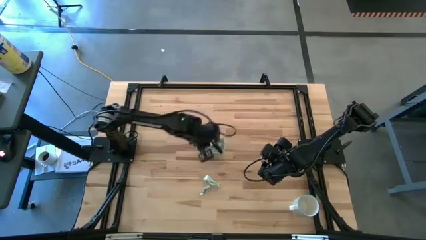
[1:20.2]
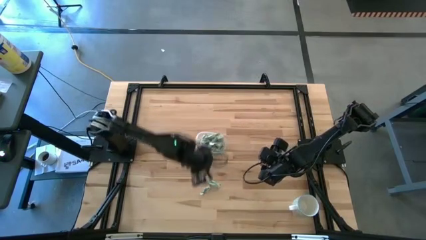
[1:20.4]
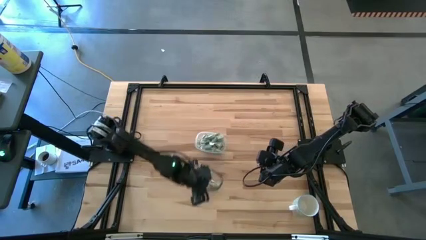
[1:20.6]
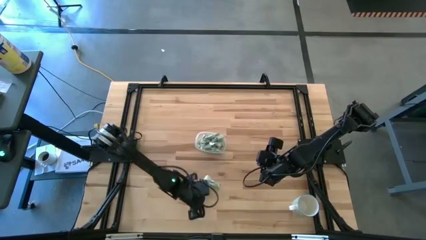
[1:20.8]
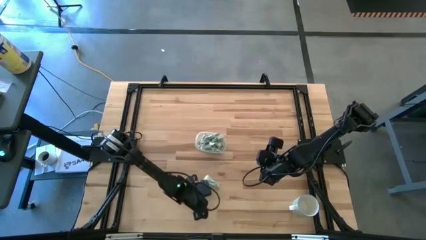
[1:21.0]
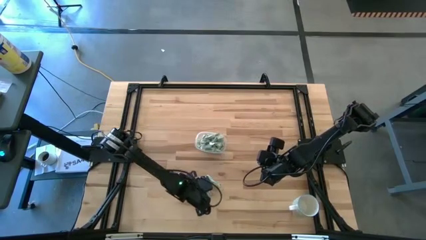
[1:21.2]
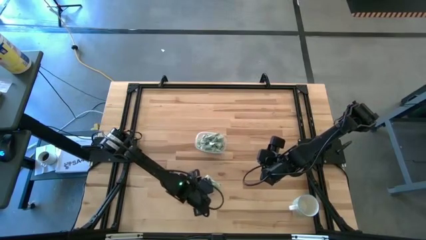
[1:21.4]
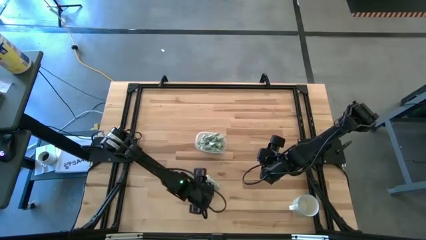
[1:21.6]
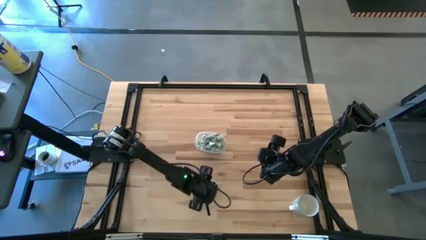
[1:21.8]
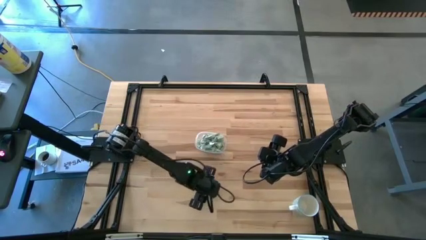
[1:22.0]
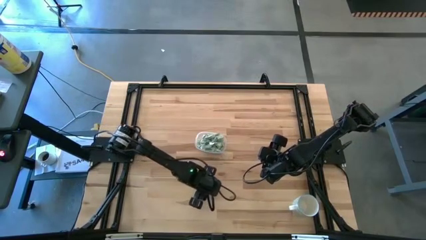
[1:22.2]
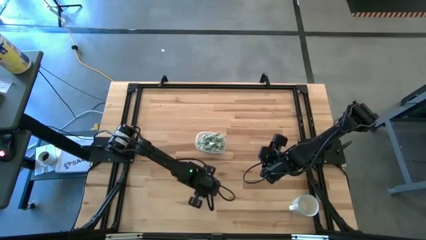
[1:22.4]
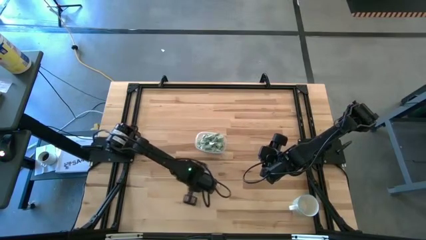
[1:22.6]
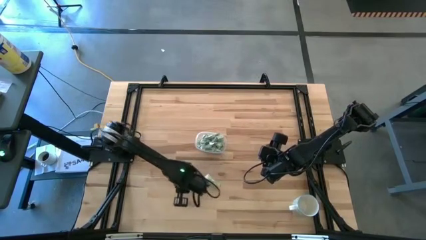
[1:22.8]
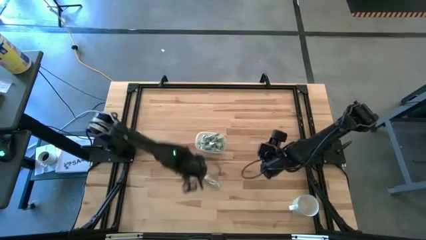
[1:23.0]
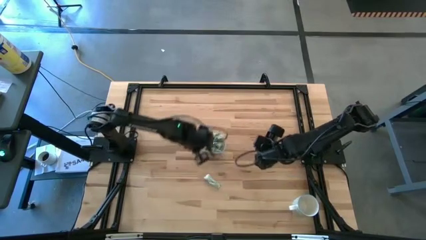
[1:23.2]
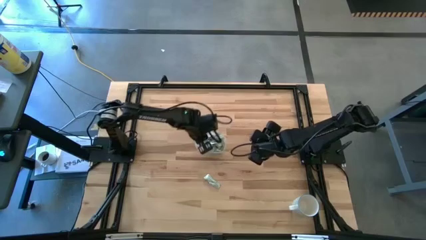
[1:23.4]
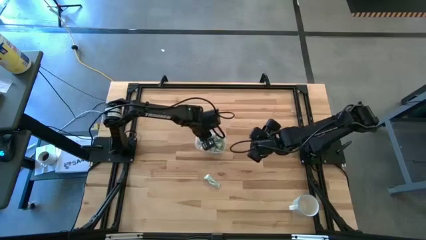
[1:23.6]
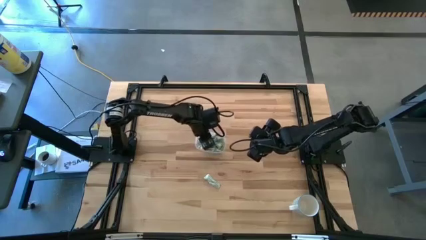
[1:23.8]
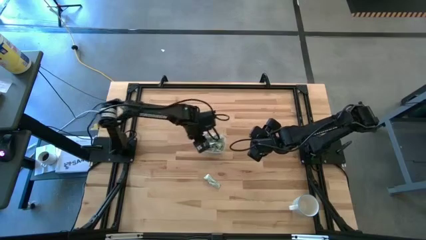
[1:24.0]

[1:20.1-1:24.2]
Task: Pick and place Stevia / Truvia into bins
Put the stevia packet into the transparent container

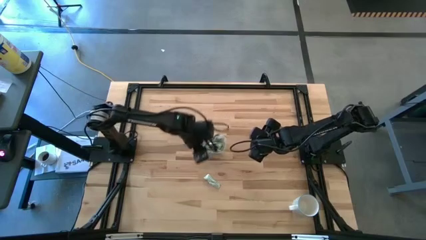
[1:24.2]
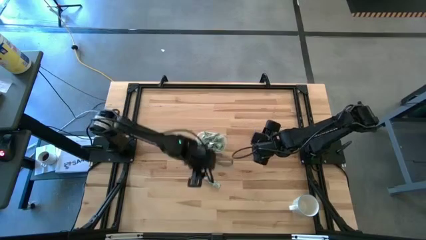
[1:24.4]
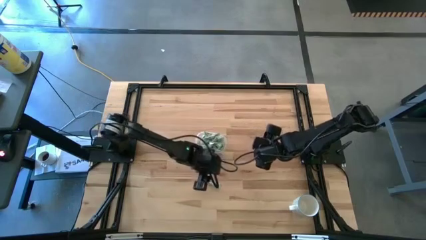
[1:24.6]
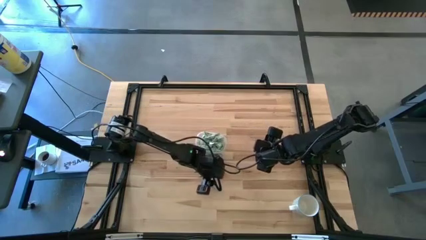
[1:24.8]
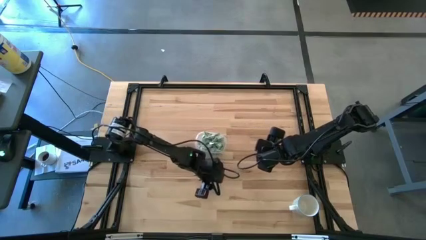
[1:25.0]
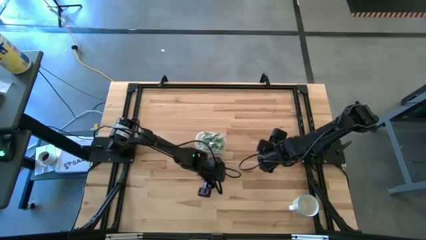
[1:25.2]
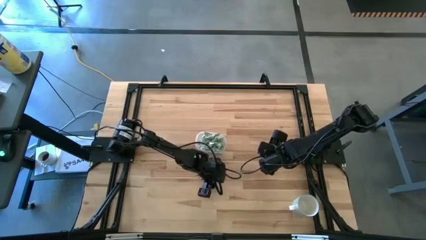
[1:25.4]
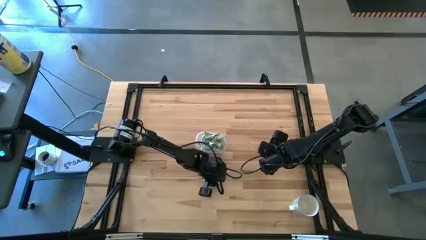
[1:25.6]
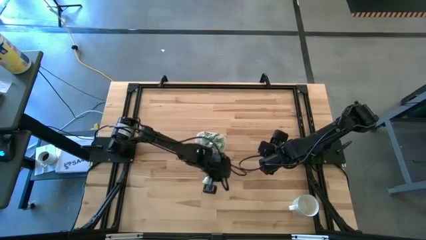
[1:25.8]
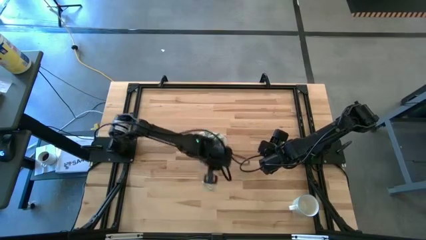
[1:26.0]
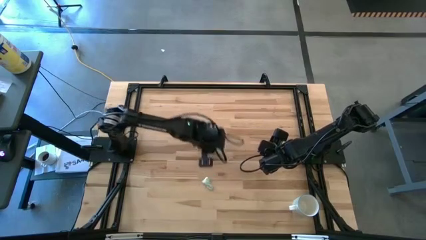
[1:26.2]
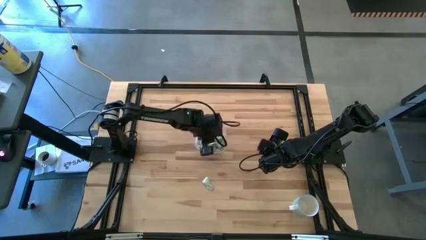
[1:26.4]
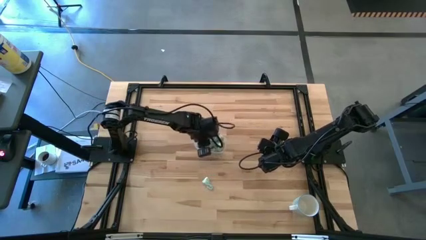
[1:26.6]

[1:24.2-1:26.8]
Put the stevia packet into the transparent container

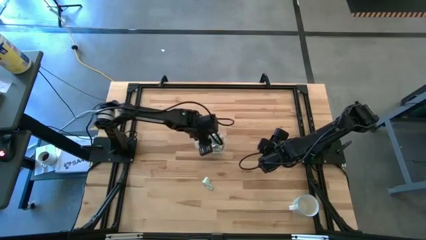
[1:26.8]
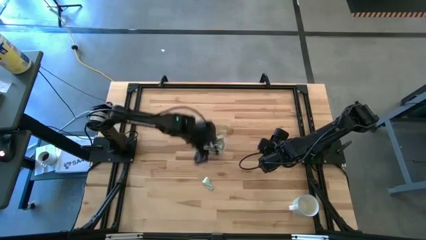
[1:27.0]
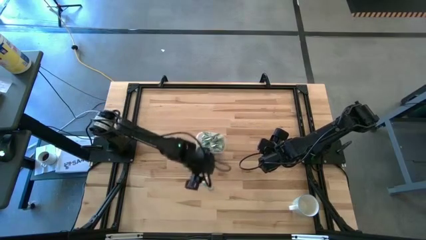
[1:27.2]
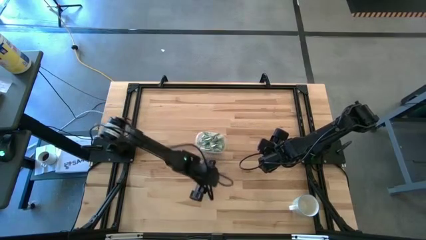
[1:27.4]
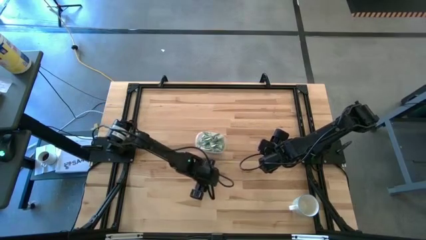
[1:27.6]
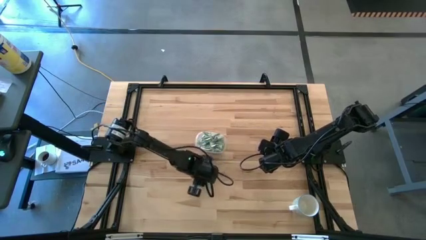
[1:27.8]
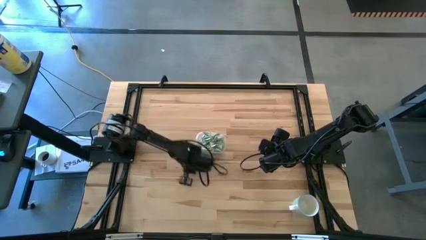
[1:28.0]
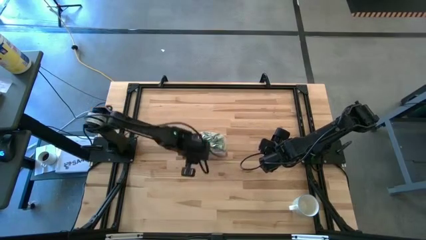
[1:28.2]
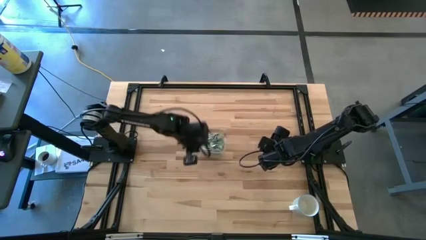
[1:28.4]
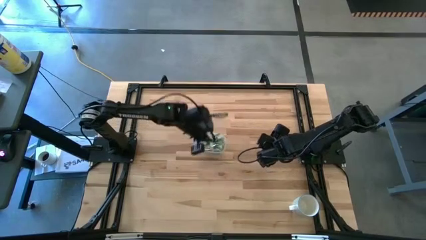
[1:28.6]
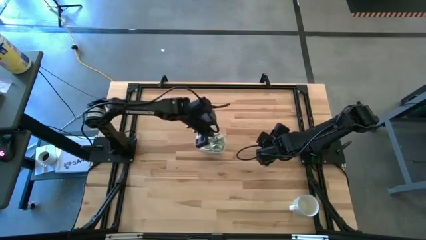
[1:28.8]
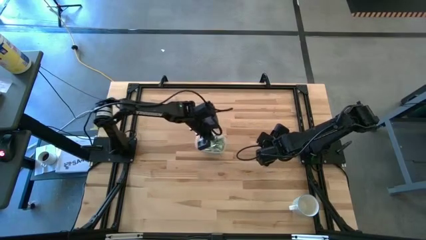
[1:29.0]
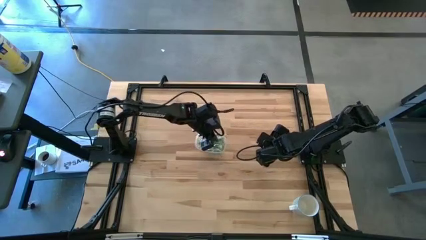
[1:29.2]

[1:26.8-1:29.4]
Put the stevia packet into the transparent container

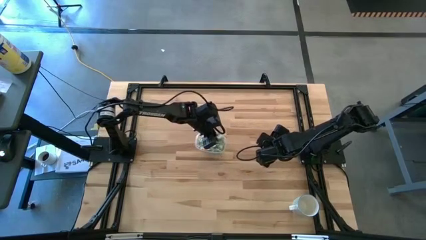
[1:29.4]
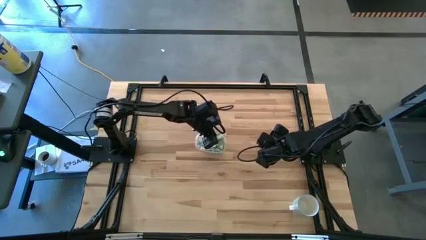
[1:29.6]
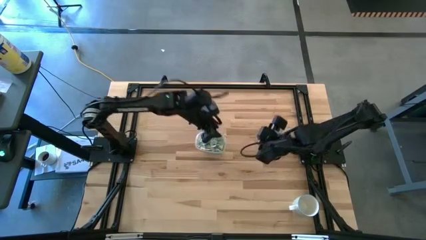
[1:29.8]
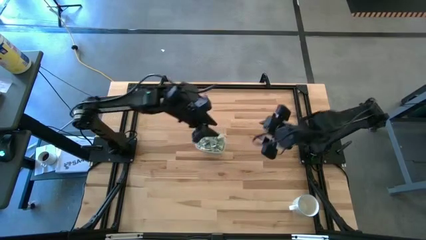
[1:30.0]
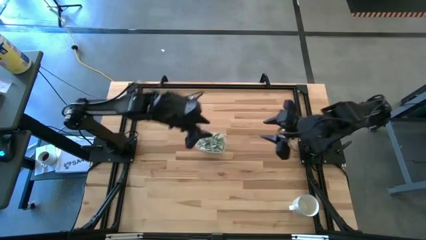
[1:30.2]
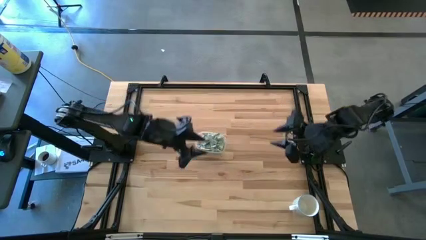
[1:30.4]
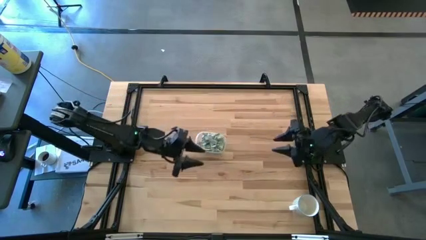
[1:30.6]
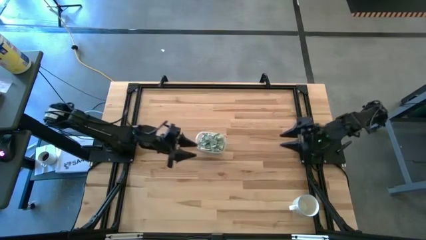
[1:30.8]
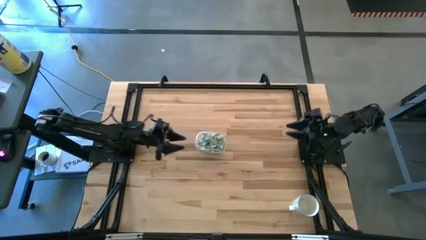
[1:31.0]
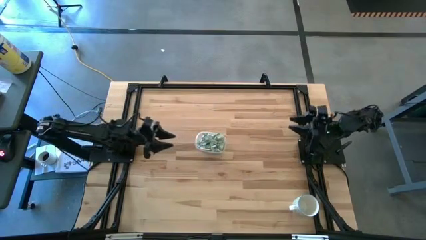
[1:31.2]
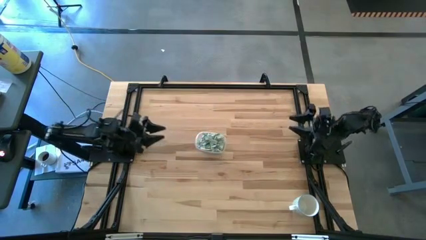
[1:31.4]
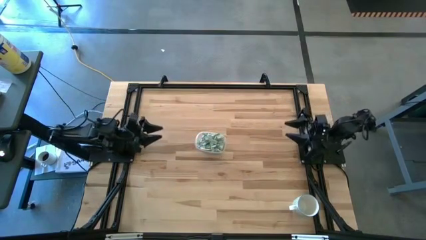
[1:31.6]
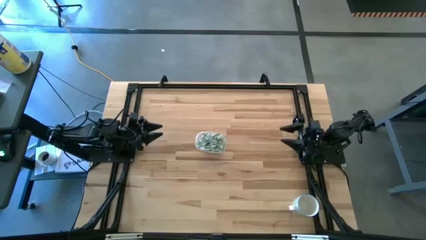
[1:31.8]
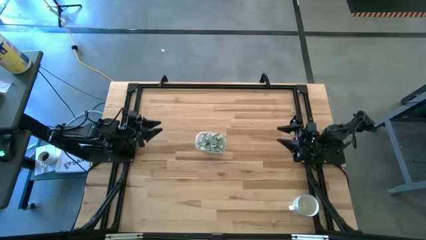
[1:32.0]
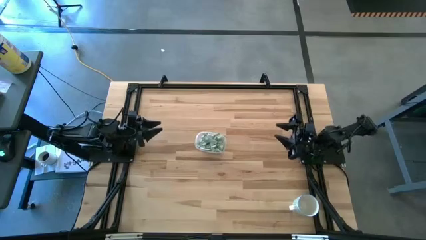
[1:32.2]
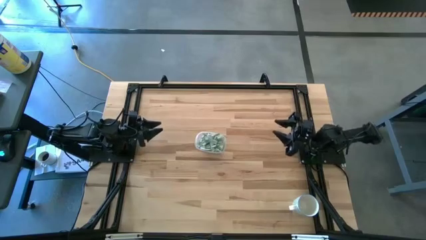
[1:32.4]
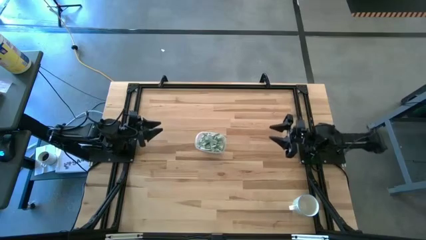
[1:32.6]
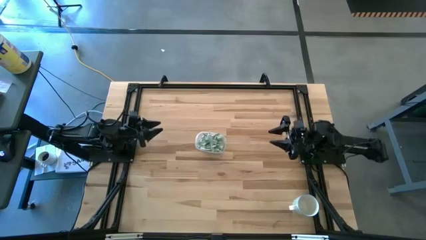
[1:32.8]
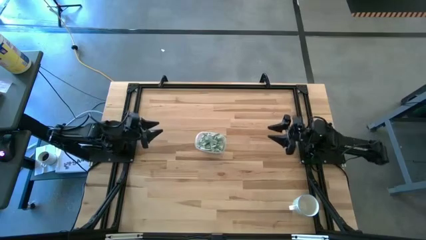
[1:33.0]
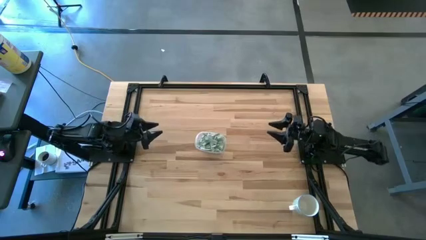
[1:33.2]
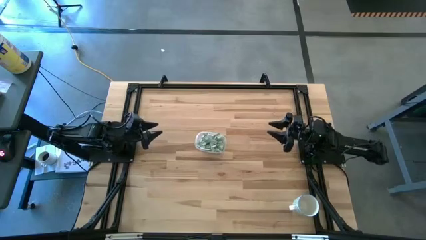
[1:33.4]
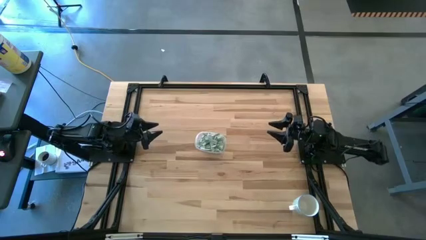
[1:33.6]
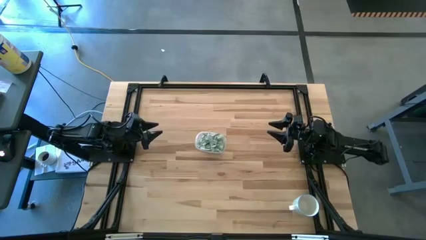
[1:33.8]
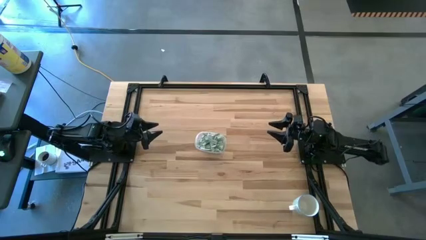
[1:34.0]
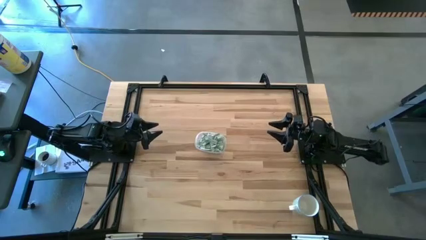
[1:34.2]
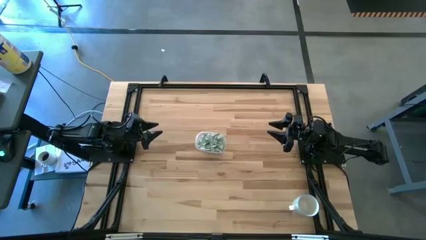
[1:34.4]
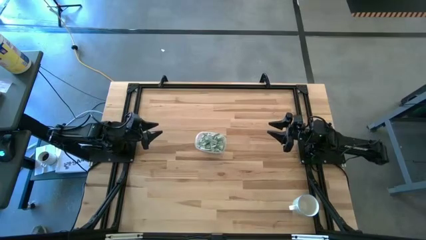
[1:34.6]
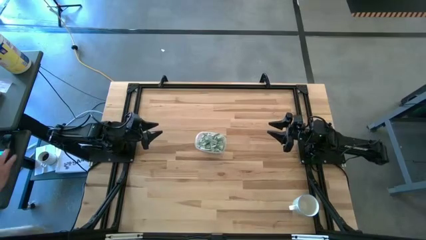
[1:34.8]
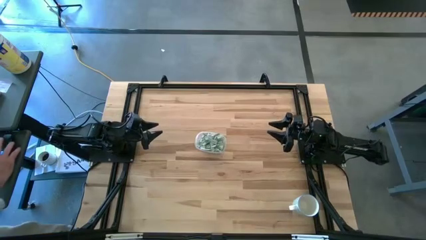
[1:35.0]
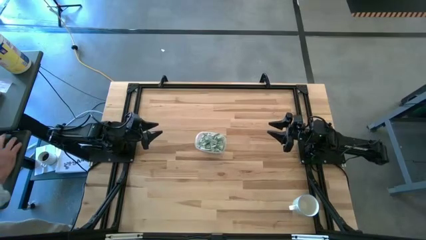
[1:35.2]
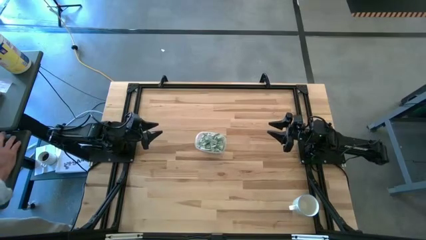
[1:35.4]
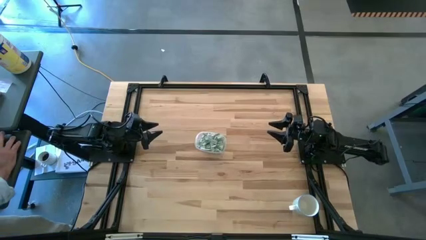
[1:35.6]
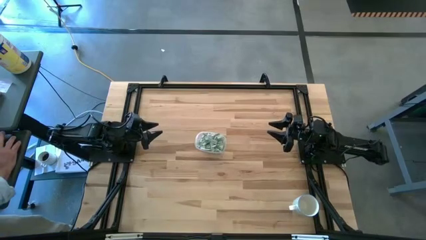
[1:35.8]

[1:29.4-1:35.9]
Return to Home Position

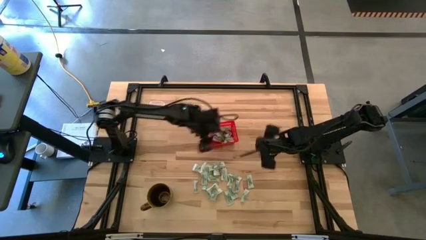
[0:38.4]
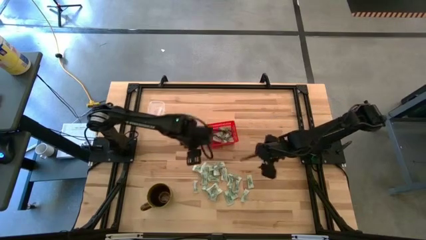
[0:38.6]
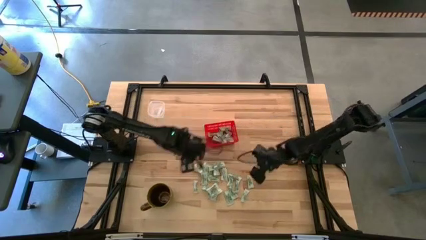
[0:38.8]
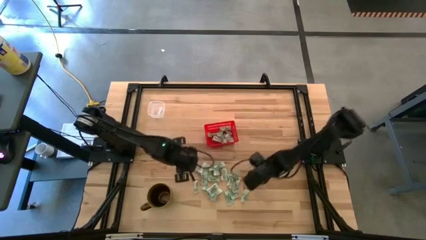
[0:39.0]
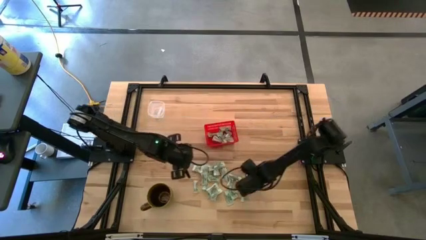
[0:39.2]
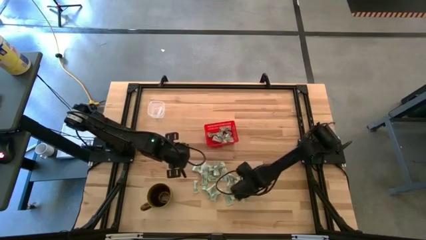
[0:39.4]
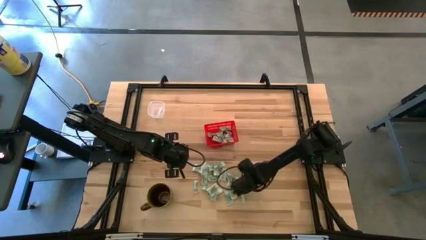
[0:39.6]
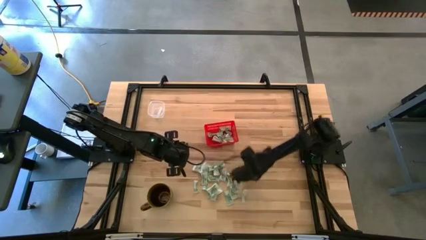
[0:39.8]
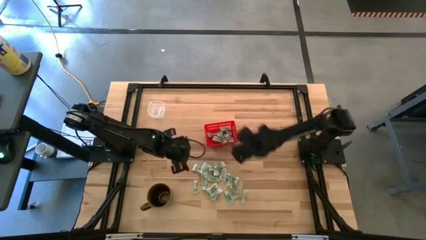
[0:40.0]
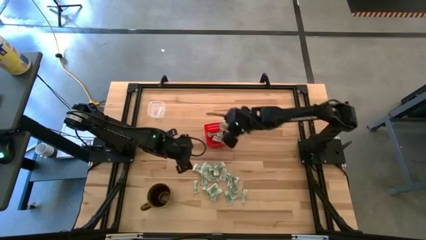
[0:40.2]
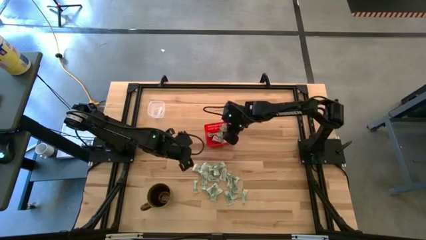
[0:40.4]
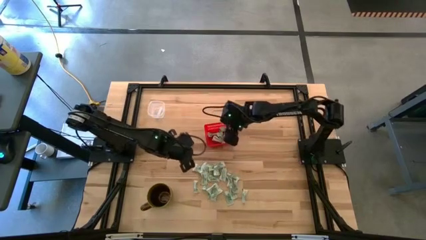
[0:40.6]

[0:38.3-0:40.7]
Task: Pick and place items into bin
Put the green stevia packet into the red bin
